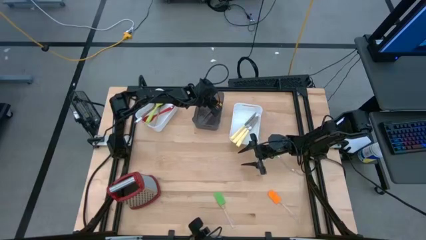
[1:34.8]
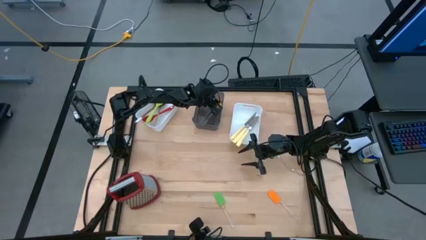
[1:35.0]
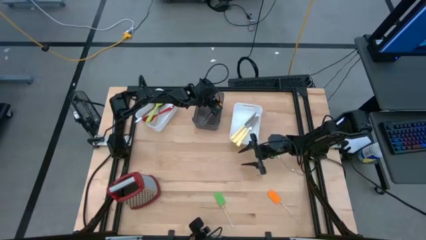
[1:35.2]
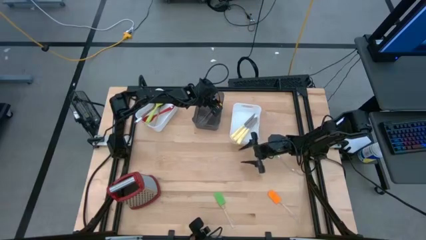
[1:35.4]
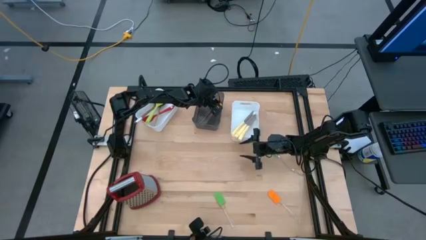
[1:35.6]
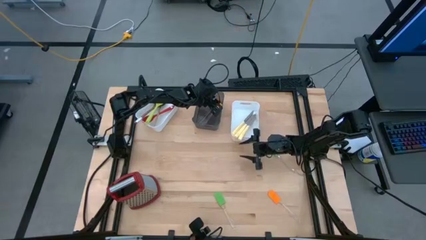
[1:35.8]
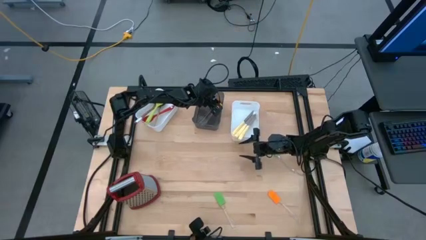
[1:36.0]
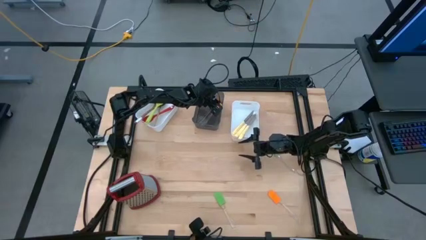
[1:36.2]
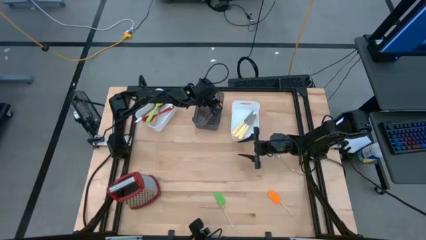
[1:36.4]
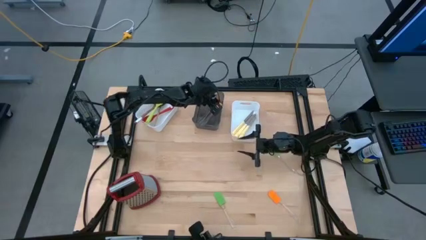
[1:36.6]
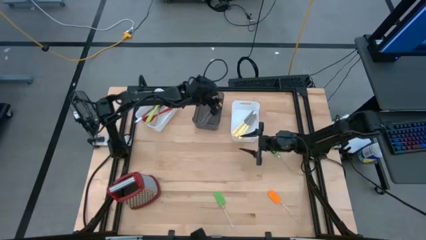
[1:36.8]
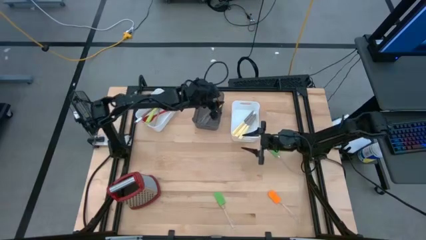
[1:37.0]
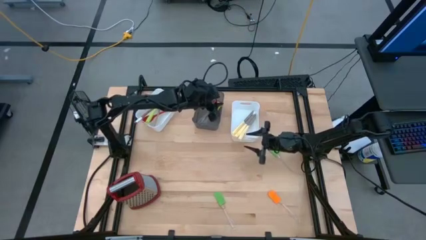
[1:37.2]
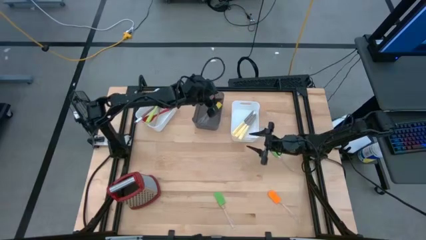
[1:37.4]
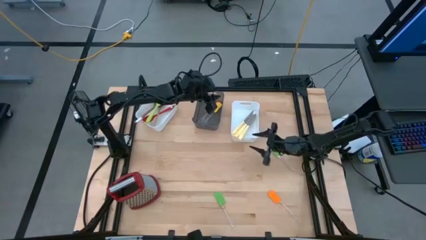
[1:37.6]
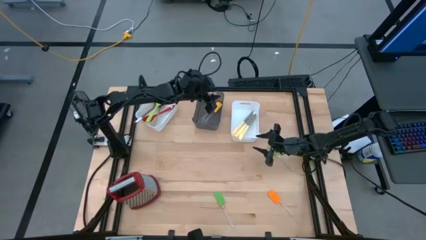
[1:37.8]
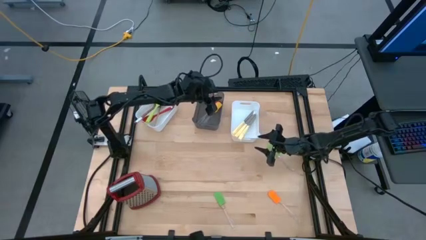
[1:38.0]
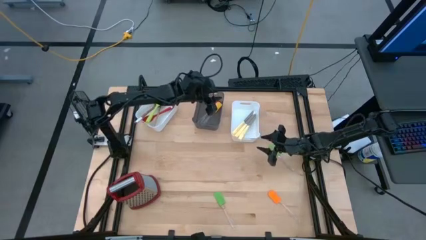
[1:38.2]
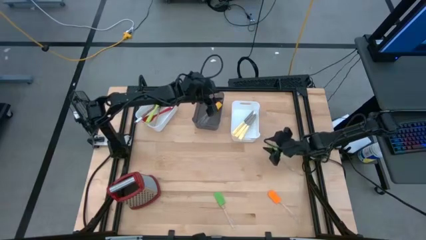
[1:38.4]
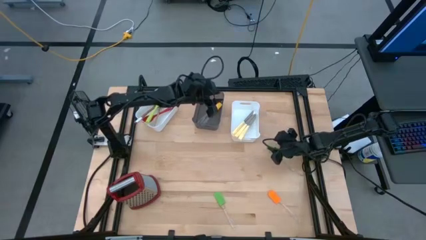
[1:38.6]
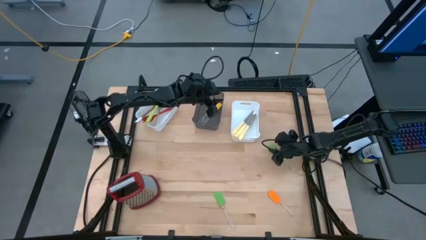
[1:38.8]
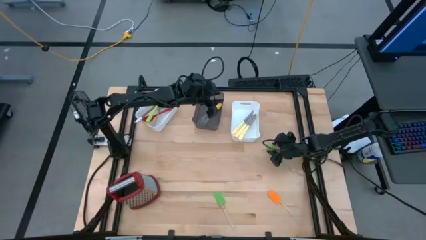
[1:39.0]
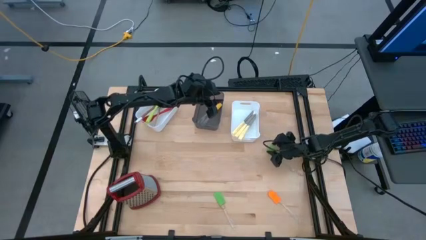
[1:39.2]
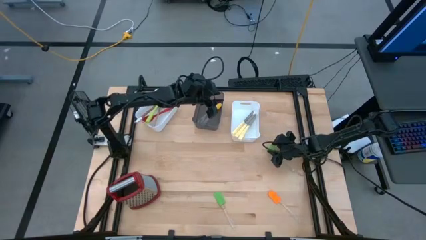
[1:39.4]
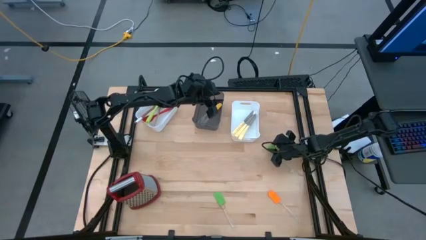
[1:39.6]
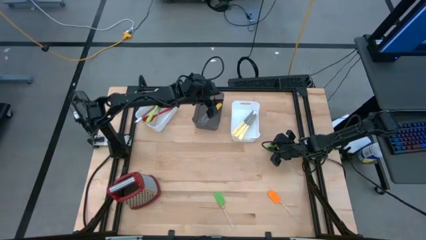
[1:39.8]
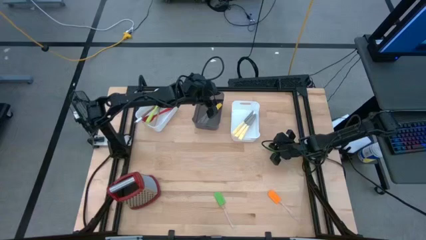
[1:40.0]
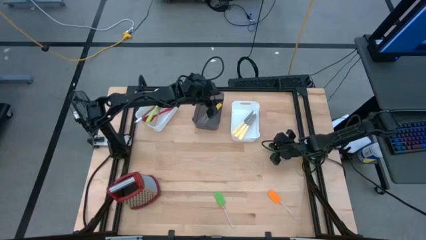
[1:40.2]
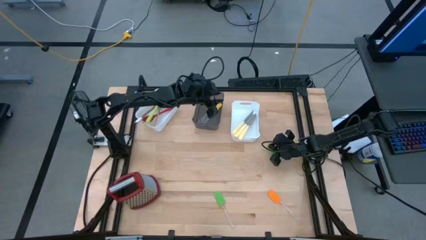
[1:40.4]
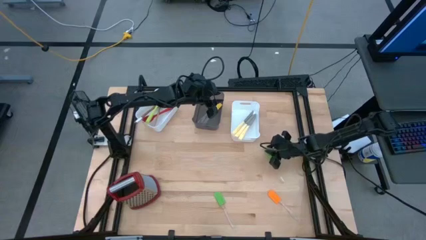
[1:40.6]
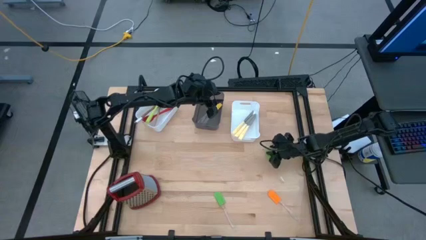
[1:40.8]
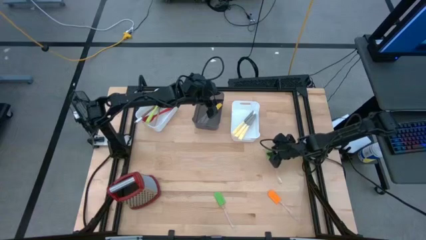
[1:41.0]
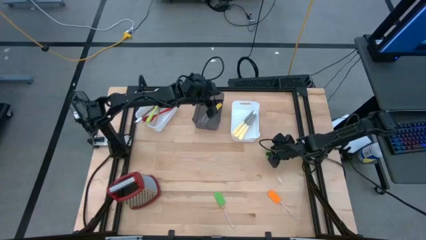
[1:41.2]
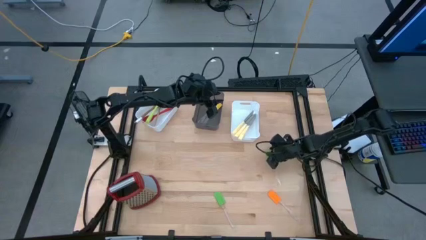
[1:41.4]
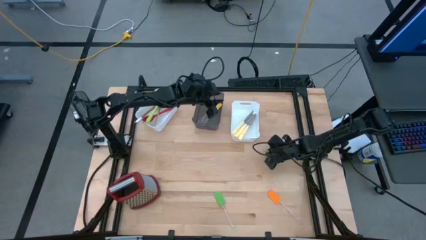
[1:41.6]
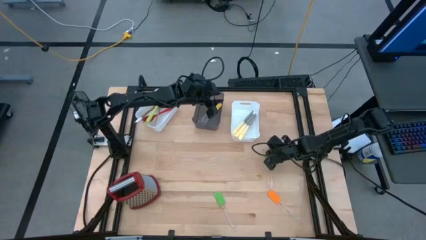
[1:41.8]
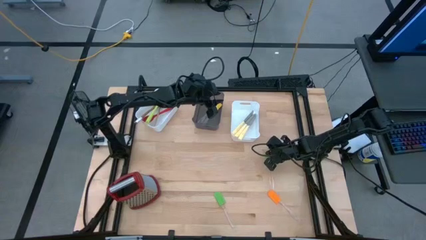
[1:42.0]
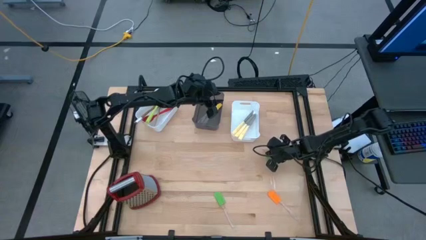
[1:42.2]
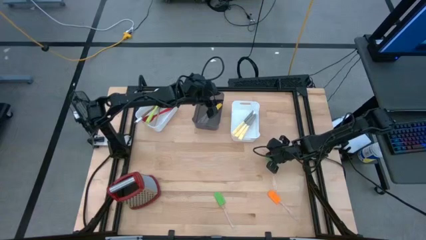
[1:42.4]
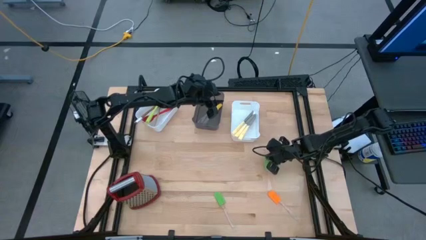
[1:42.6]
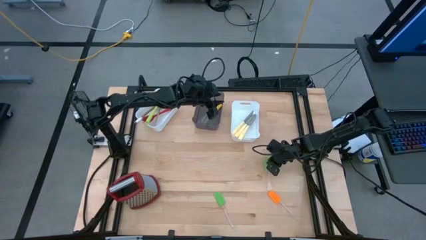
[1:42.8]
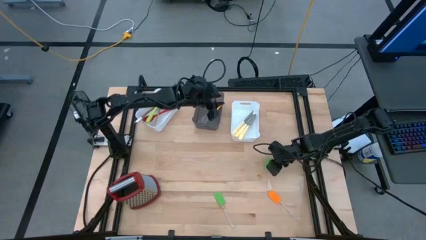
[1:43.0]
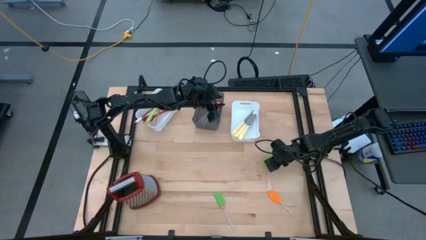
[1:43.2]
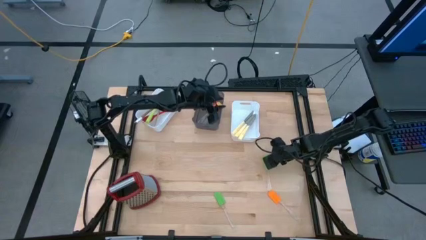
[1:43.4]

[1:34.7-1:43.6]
Task: Pick & Place Kitchen Items
Put the top green spatula into the black bin

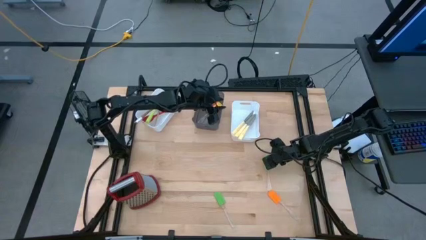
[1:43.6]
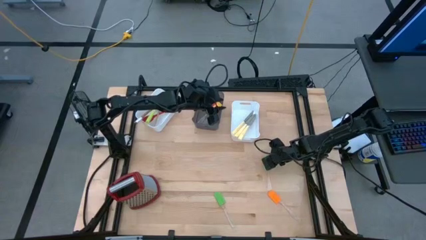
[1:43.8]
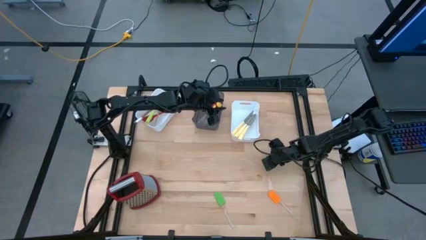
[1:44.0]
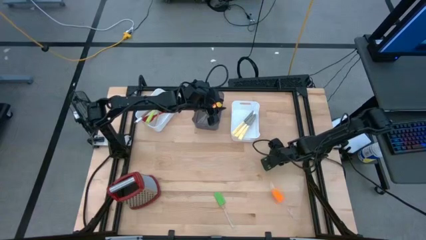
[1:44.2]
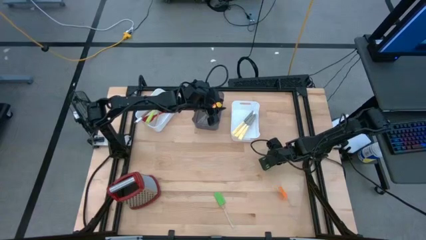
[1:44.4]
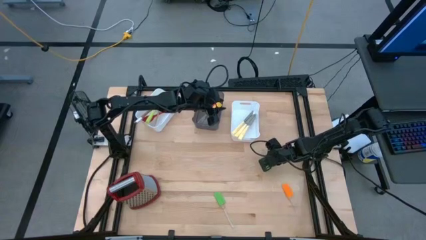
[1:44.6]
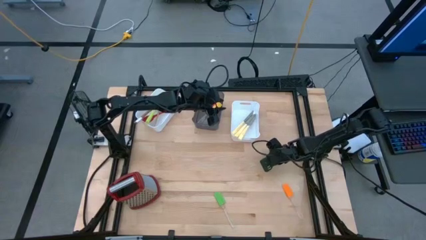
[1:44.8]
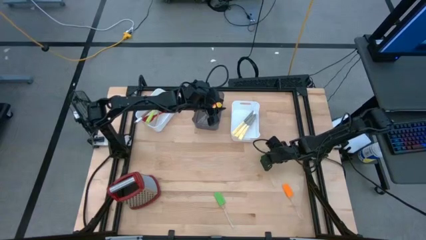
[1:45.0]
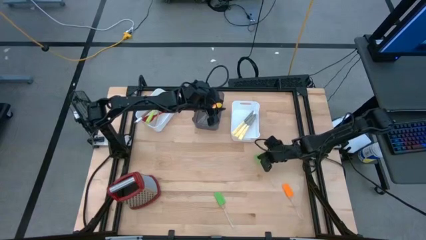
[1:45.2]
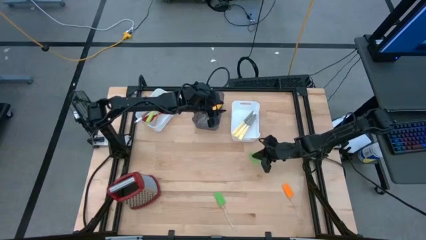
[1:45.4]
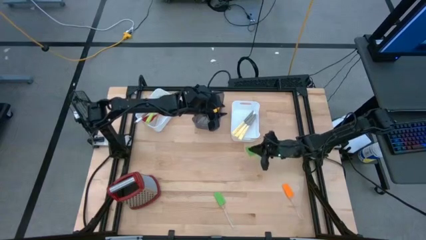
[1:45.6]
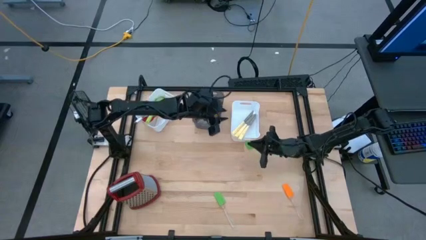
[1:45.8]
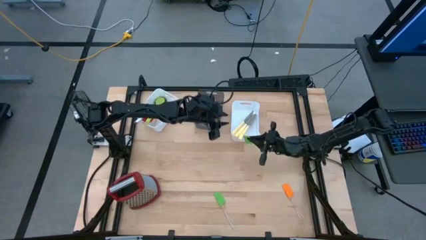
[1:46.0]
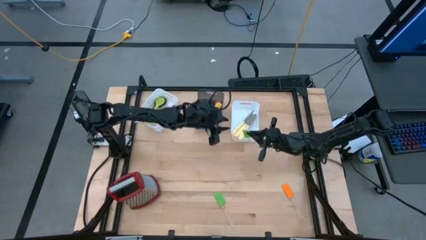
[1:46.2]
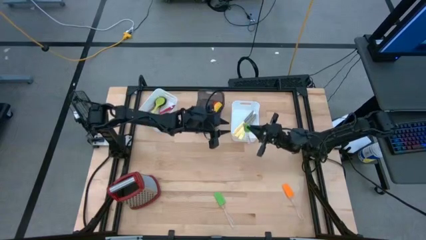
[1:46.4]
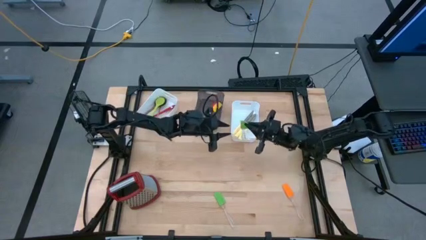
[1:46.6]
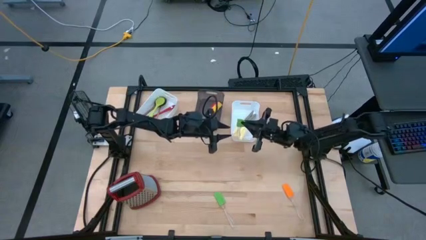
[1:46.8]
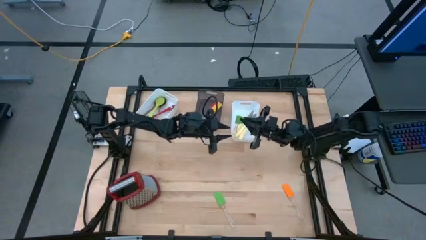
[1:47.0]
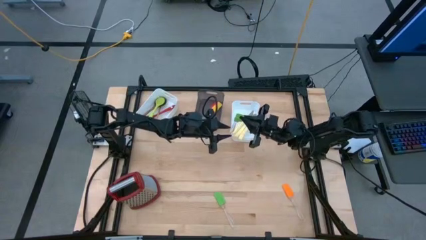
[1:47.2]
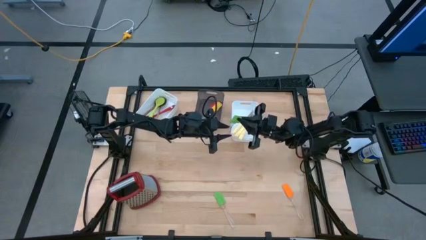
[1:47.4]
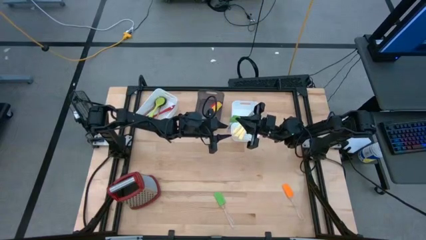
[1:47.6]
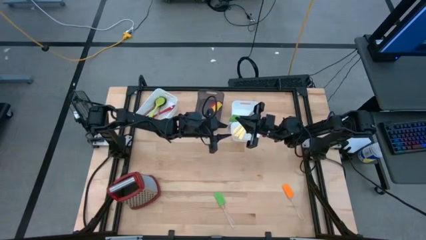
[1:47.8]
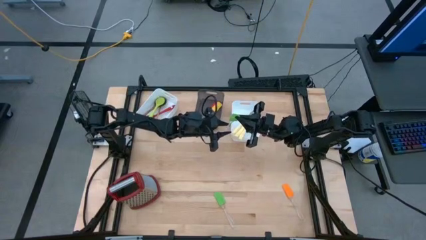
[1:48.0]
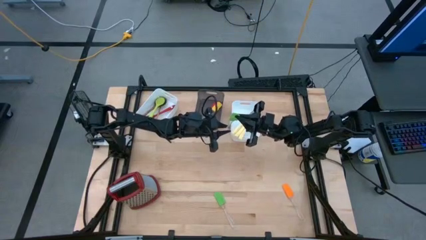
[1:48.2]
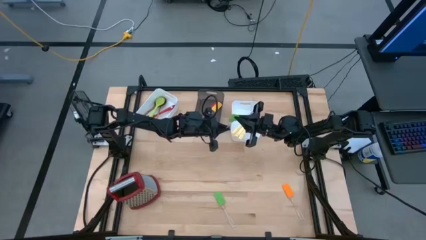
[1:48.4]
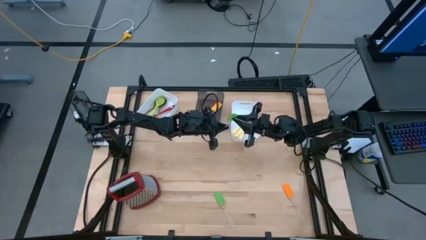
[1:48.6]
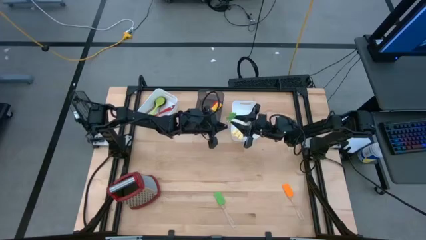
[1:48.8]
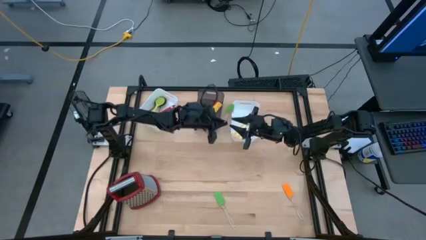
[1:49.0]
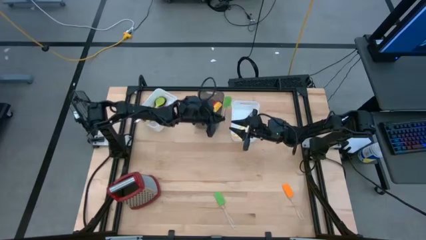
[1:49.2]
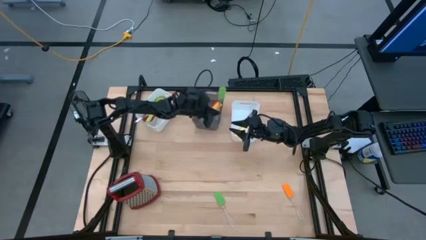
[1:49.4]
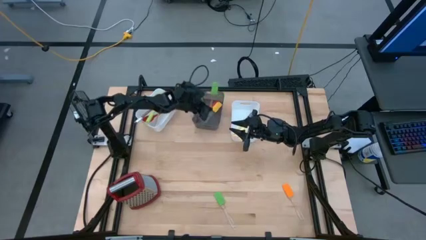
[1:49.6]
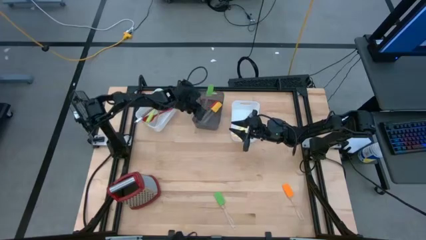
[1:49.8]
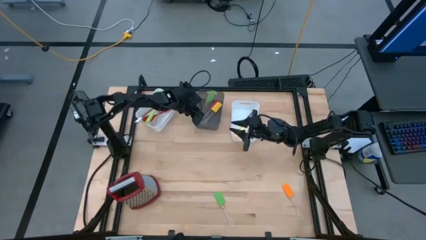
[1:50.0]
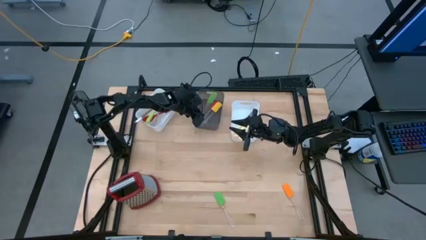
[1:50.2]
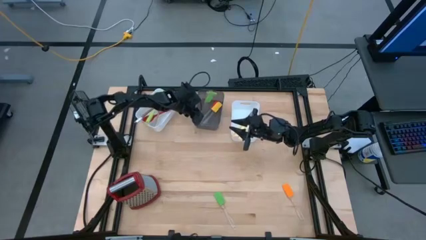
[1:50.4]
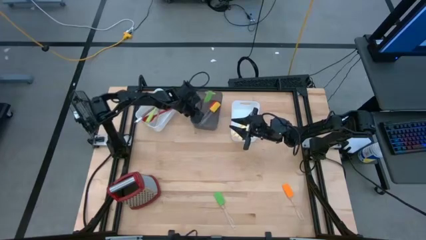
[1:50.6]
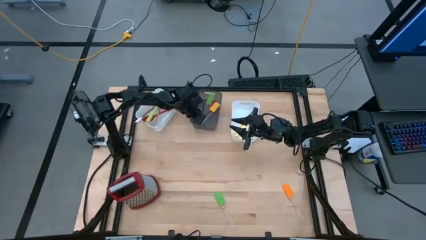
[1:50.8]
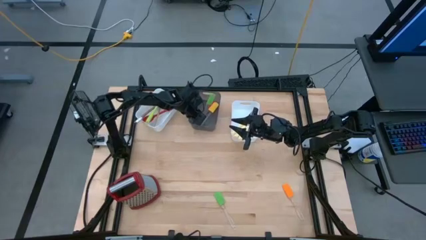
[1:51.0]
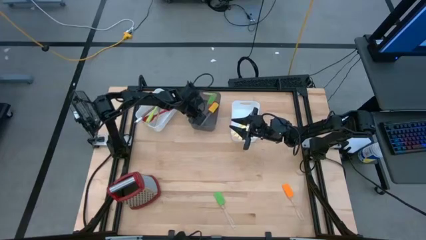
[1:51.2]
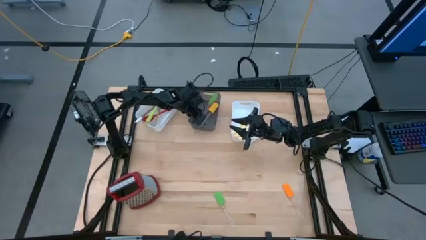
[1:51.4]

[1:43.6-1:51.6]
Put the top green spatula into the black bin
